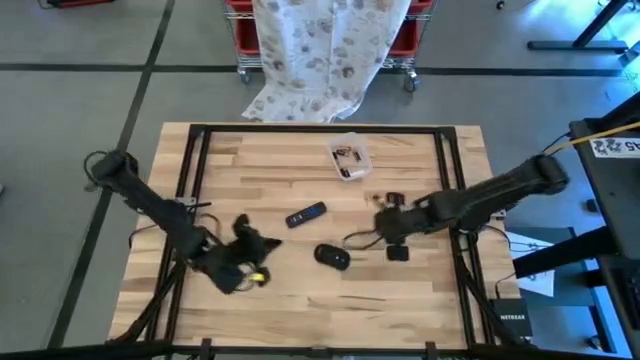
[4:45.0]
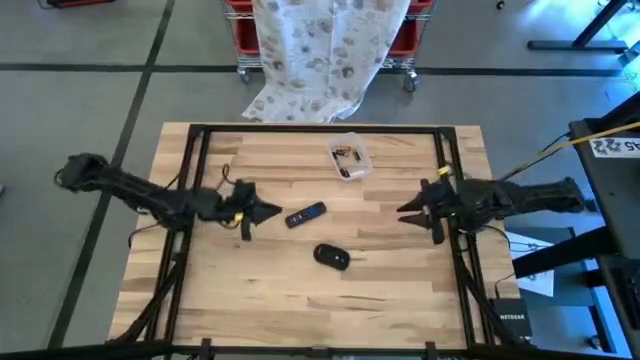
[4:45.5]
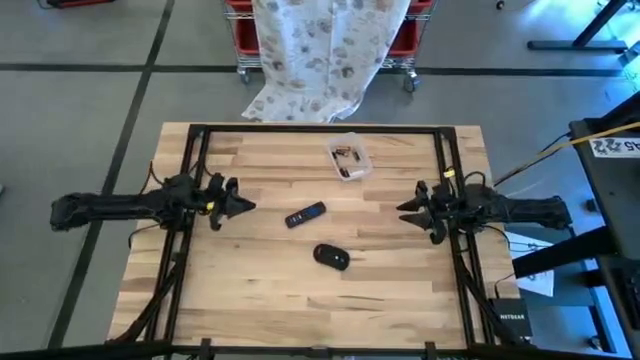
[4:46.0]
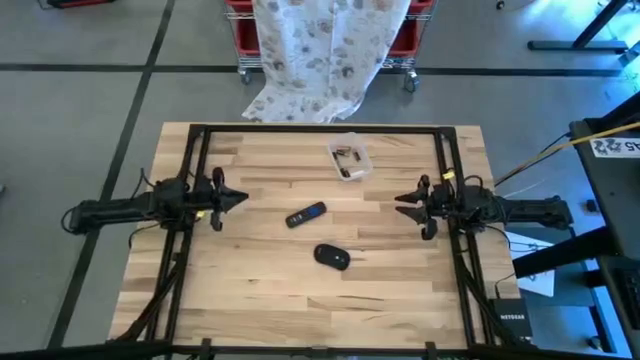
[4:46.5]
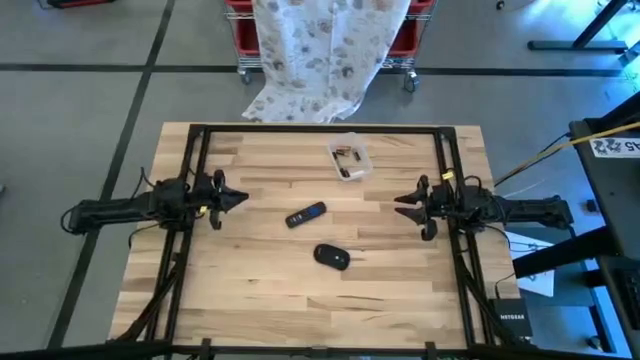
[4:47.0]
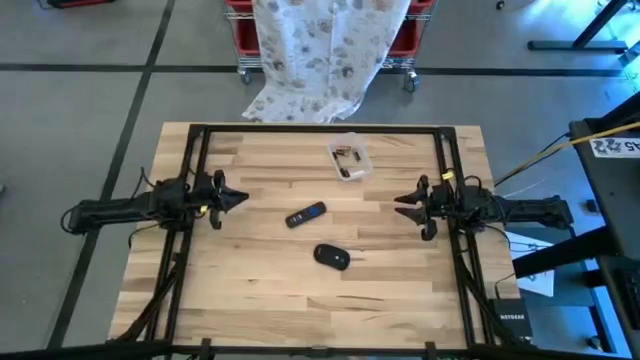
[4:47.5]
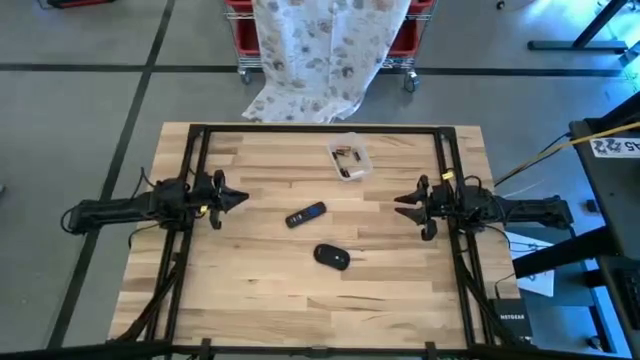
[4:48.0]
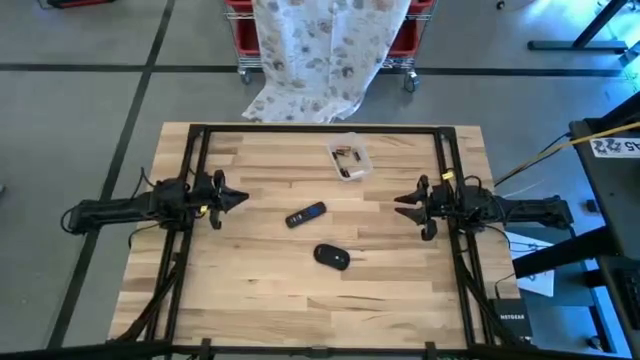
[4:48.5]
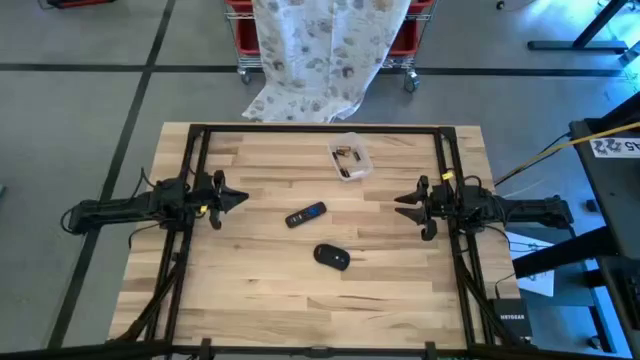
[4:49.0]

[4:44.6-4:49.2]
Task: Insert battery
Return to Home Position

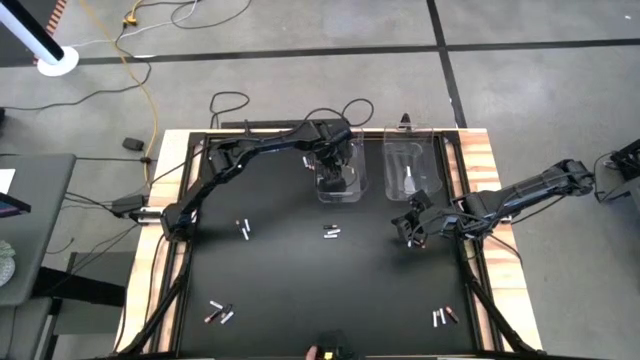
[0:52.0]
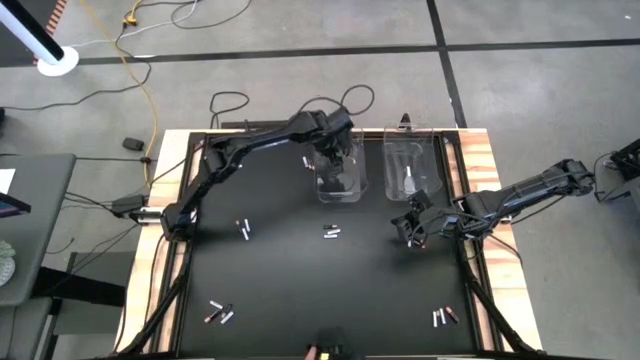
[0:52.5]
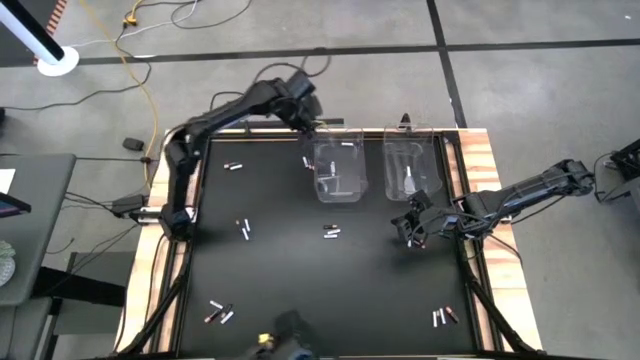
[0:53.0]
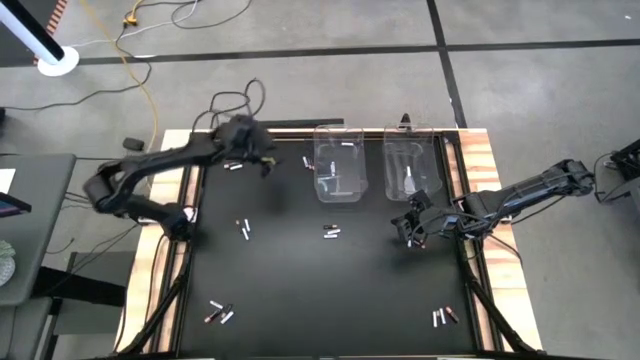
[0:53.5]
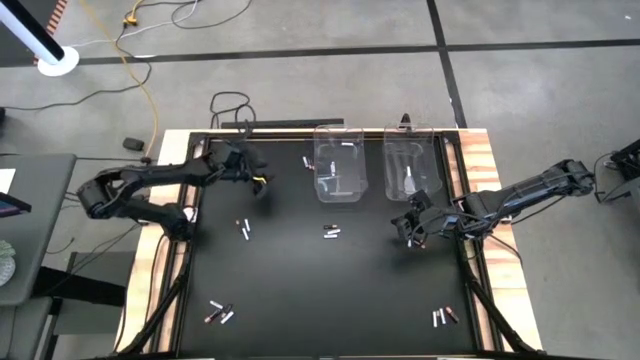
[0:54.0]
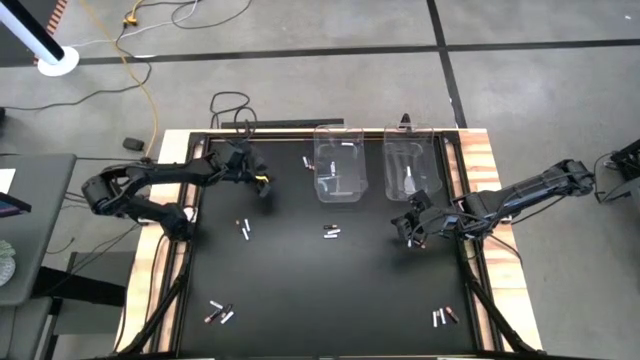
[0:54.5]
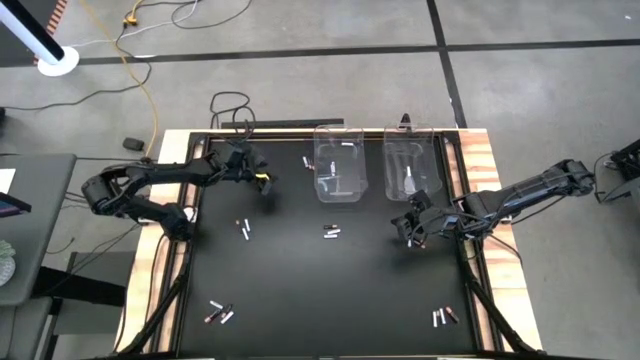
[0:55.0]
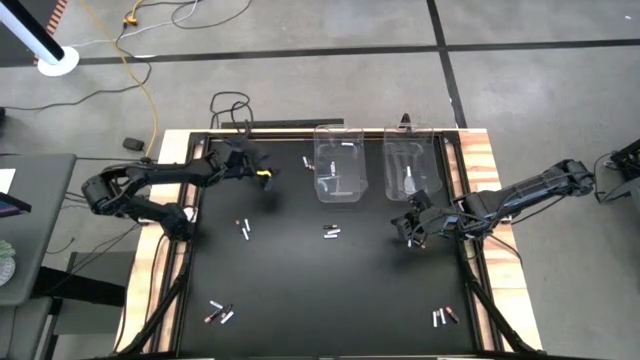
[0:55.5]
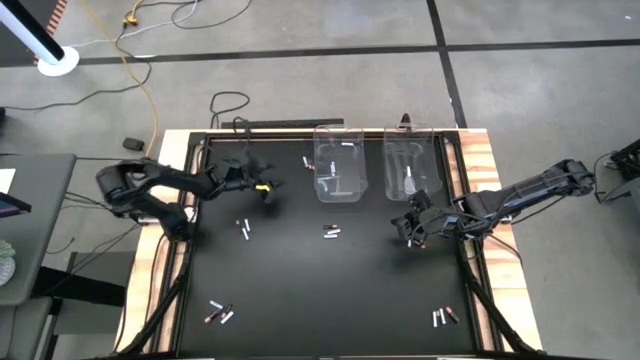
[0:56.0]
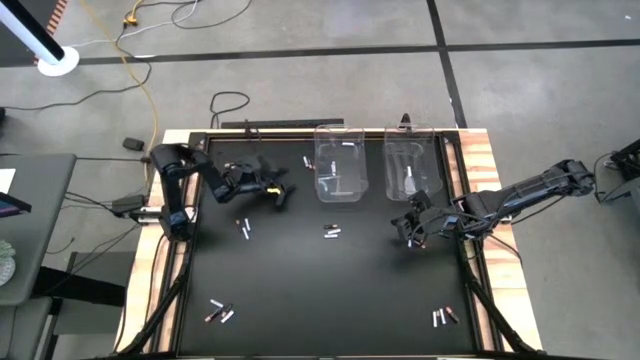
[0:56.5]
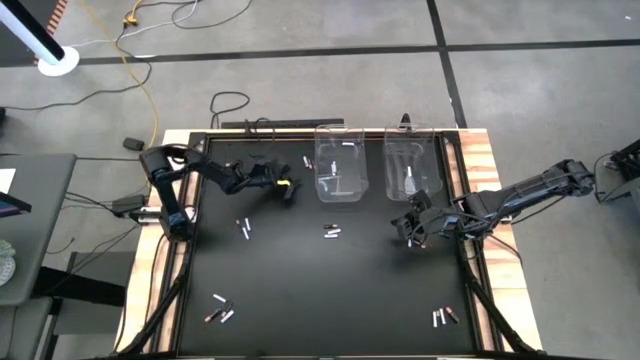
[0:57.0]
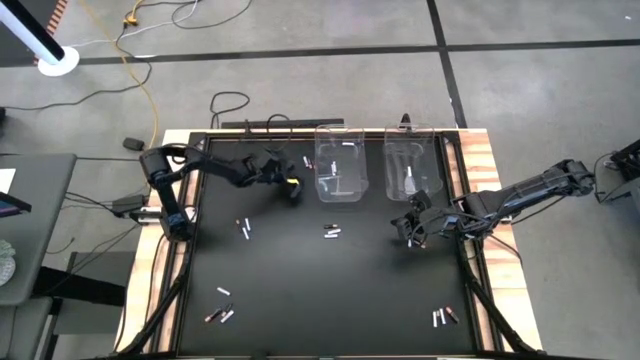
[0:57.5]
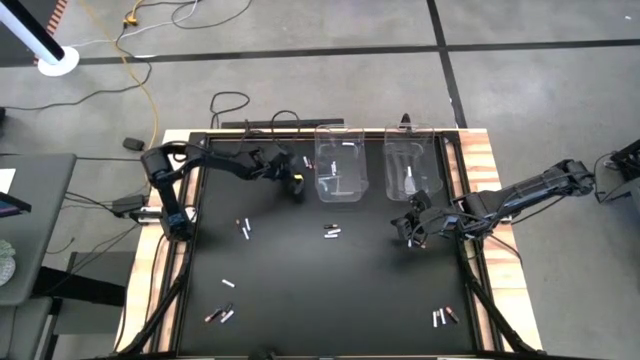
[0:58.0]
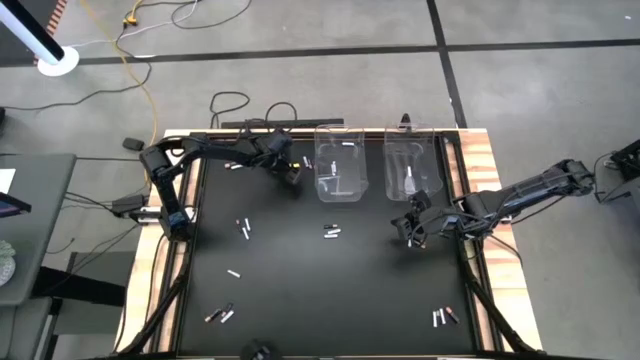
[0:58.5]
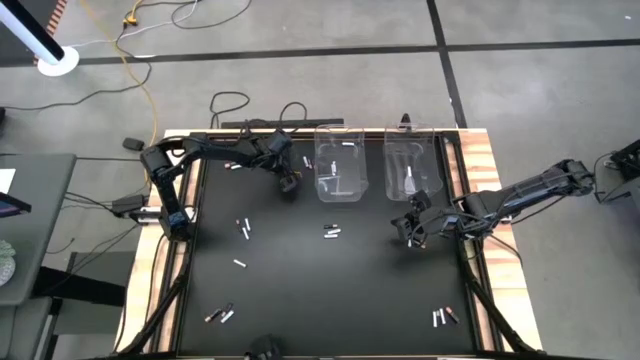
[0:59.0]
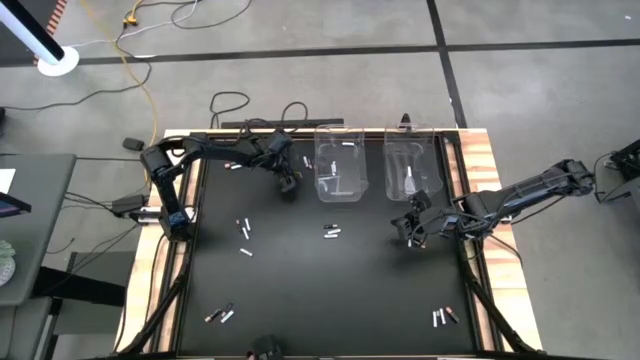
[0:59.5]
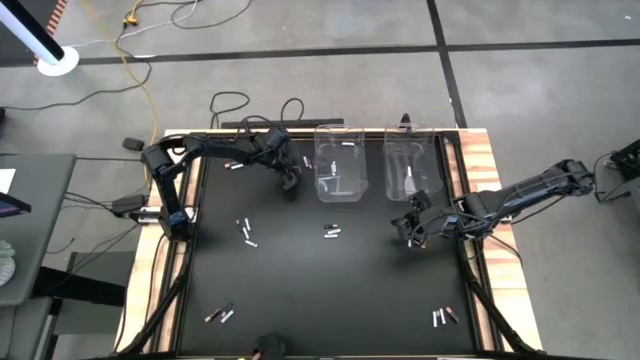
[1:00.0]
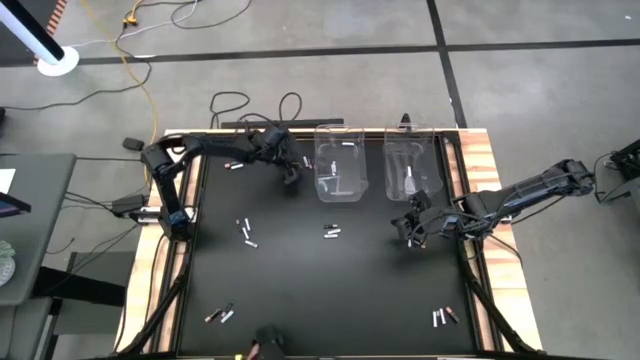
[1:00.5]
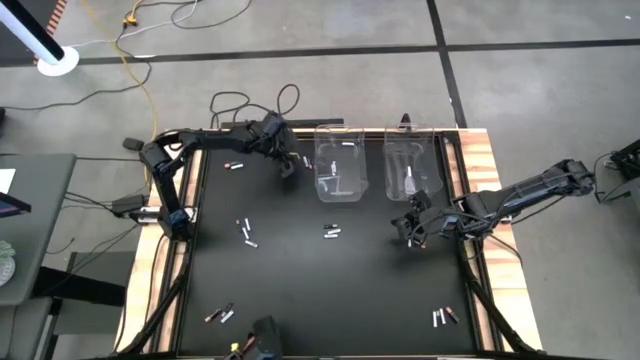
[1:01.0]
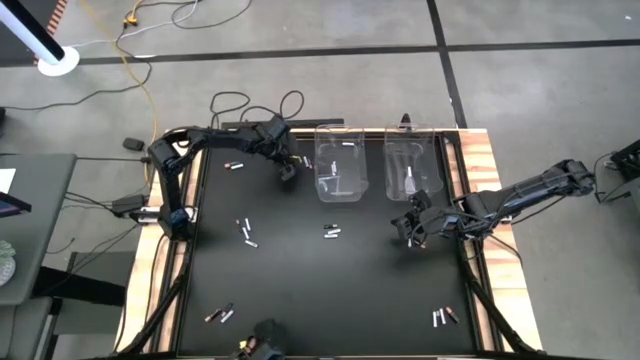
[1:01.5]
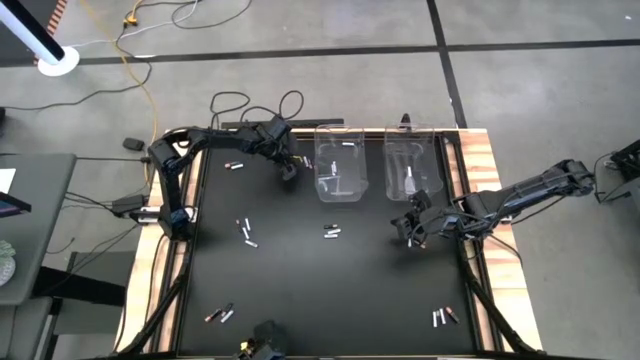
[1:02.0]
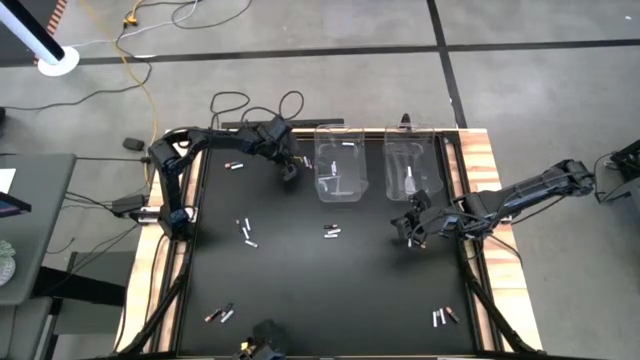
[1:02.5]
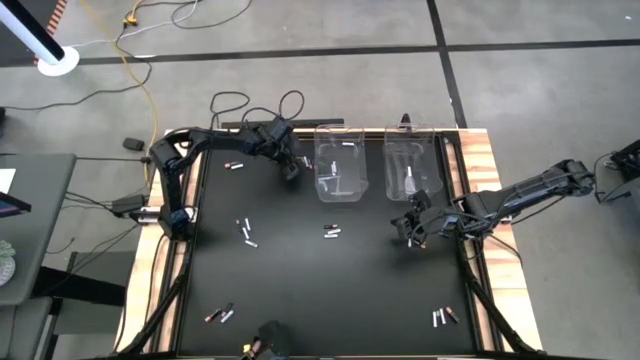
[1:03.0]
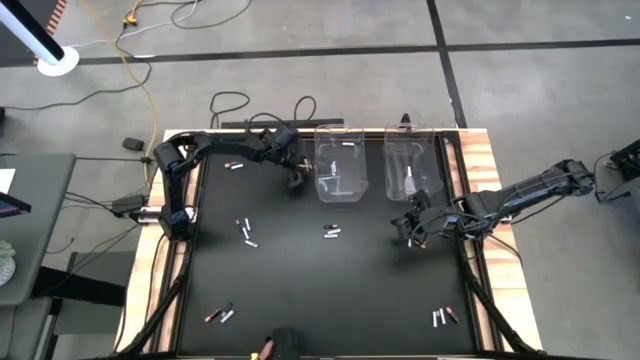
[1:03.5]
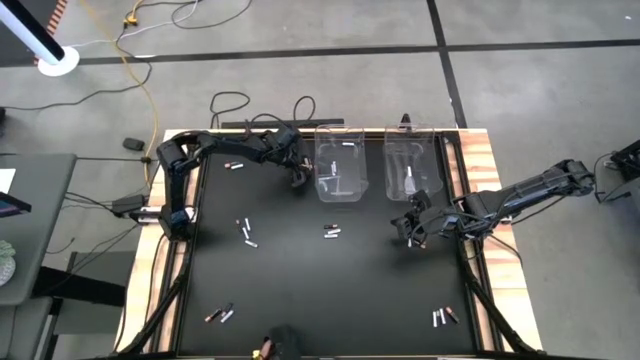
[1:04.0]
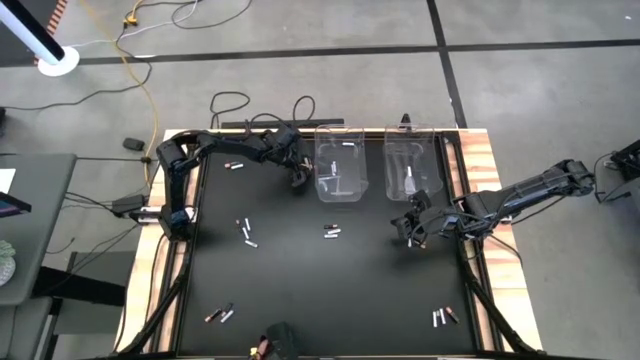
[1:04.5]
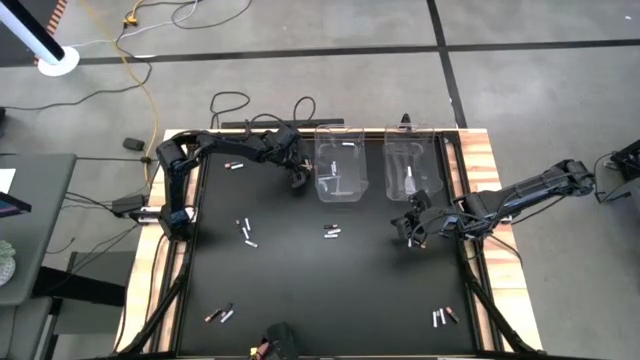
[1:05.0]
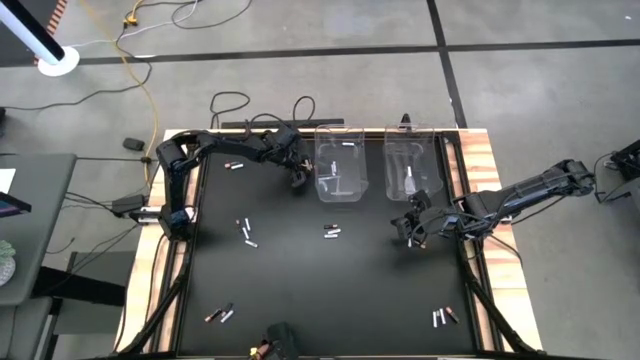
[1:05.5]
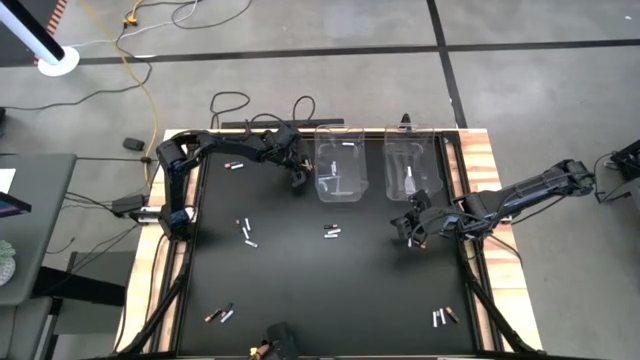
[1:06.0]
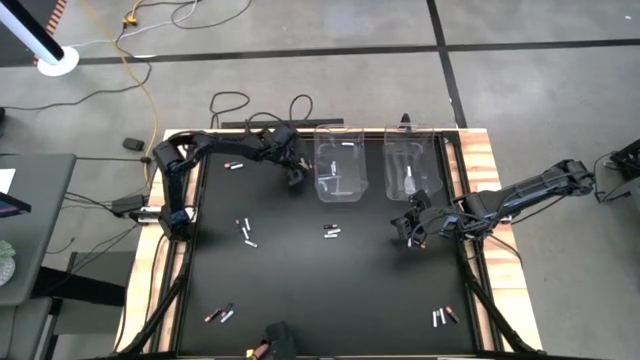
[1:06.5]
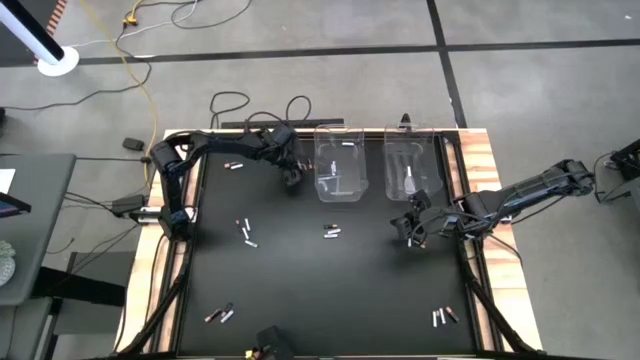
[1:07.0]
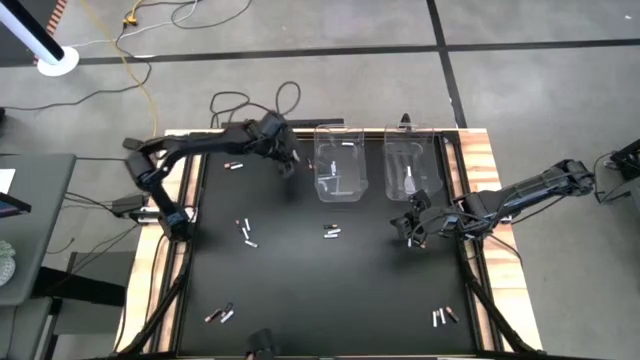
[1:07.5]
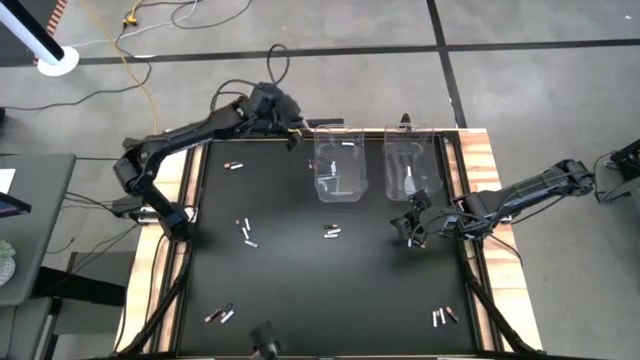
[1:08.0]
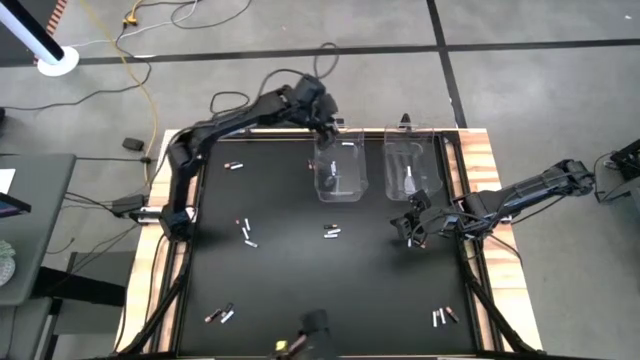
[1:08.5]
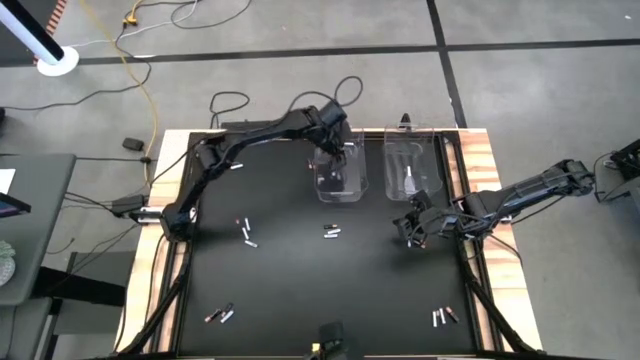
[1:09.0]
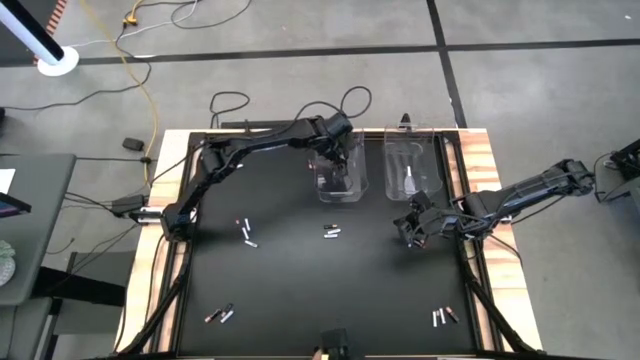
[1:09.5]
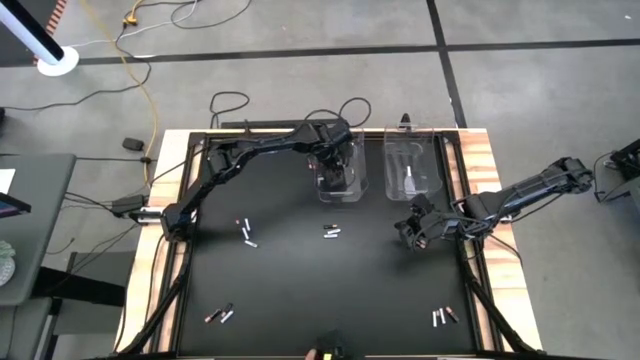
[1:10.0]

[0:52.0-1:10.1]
Task: Sort batteries
Put the white battery into the left transparent bin
